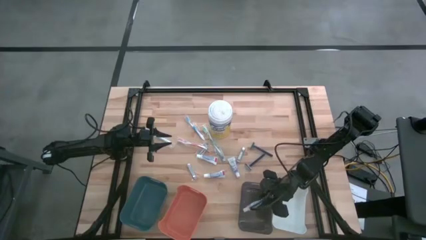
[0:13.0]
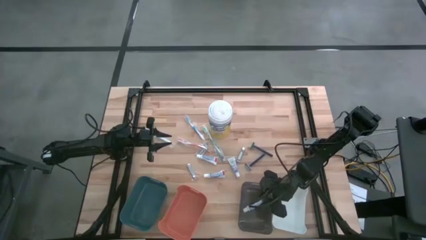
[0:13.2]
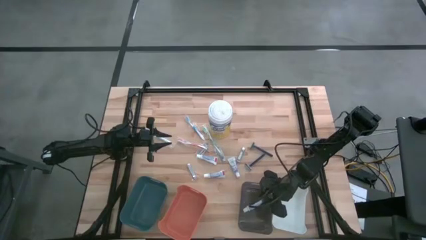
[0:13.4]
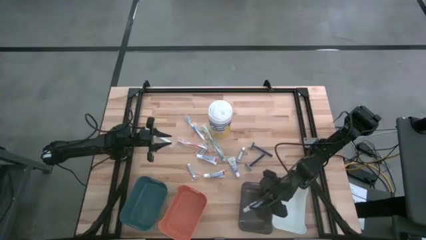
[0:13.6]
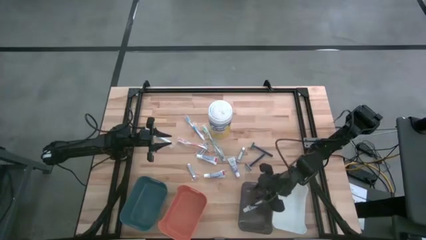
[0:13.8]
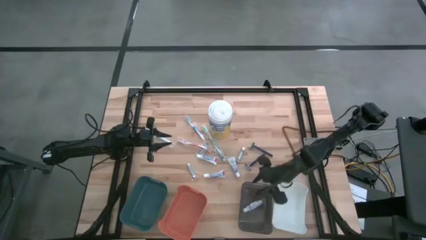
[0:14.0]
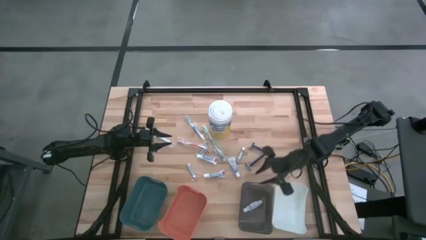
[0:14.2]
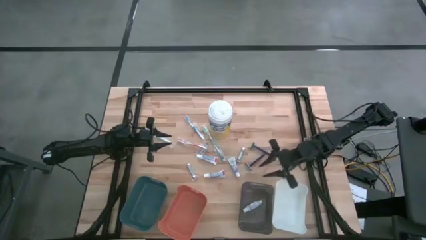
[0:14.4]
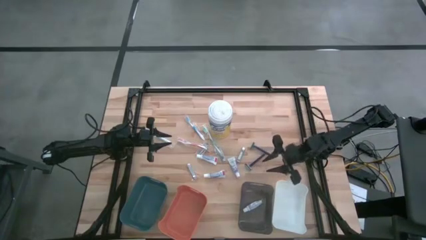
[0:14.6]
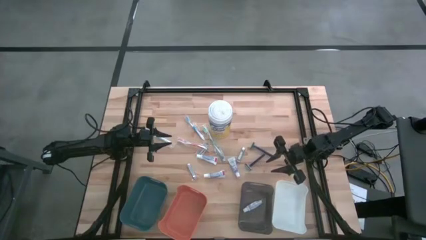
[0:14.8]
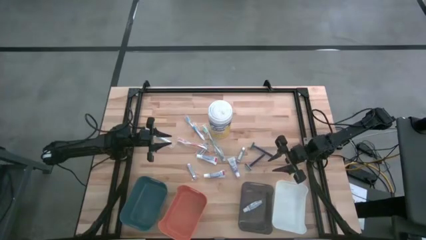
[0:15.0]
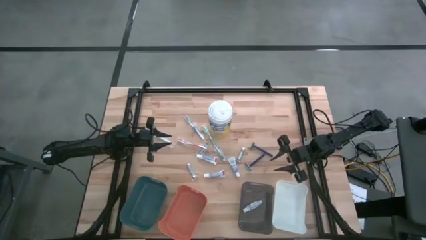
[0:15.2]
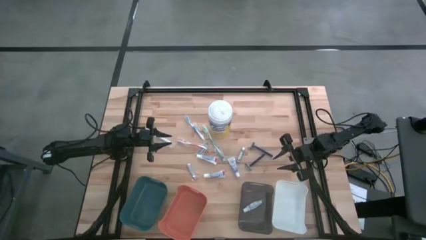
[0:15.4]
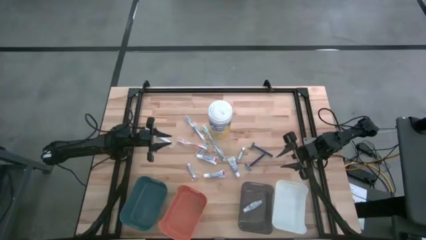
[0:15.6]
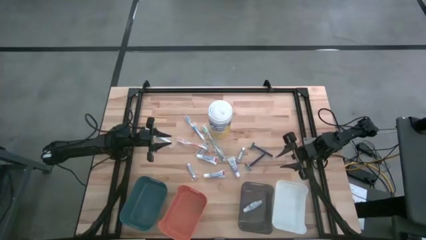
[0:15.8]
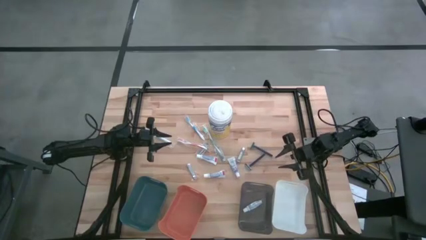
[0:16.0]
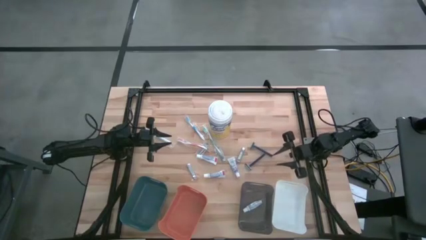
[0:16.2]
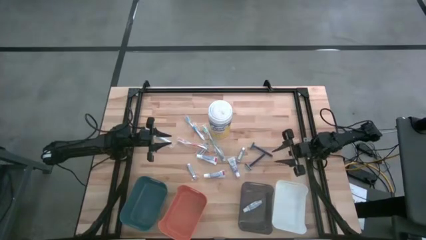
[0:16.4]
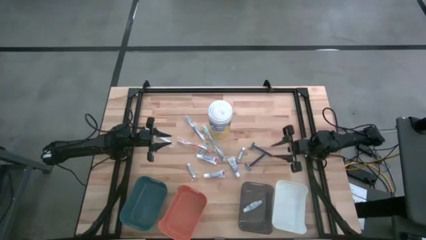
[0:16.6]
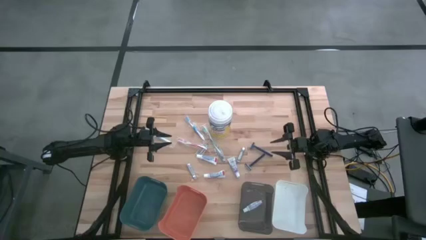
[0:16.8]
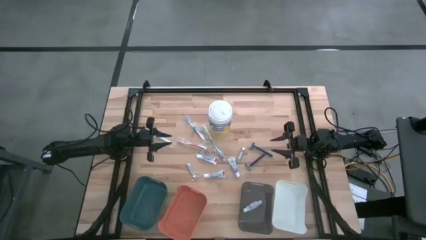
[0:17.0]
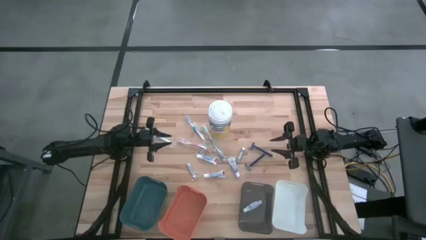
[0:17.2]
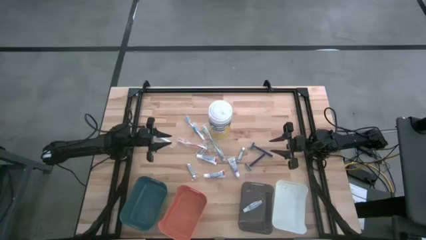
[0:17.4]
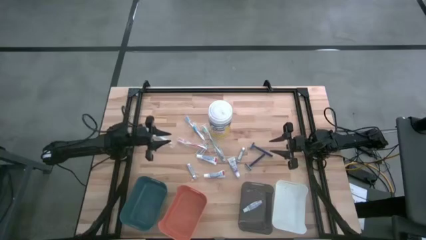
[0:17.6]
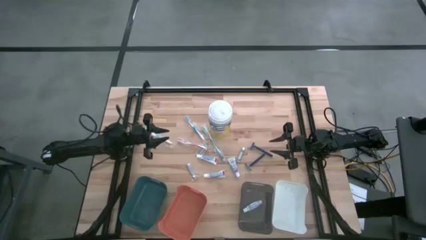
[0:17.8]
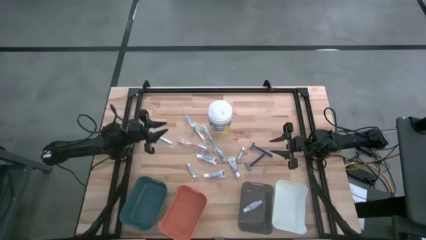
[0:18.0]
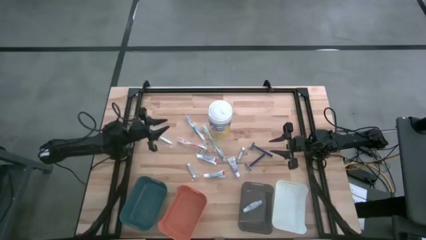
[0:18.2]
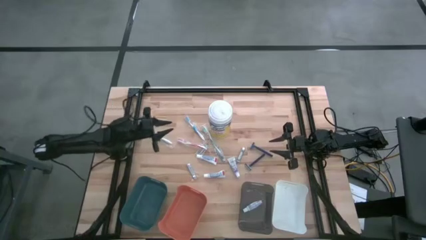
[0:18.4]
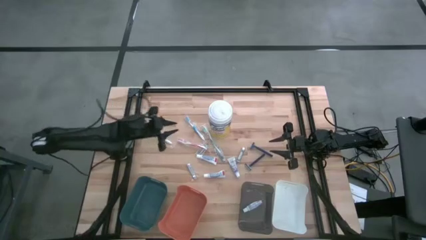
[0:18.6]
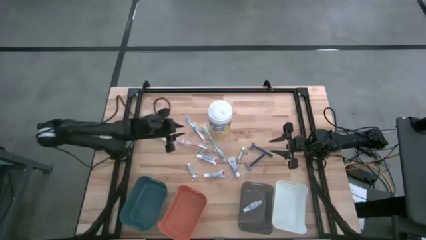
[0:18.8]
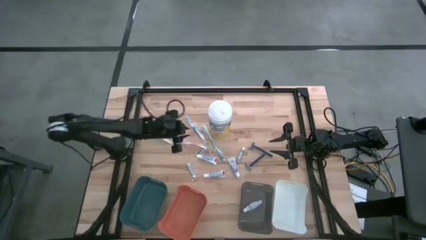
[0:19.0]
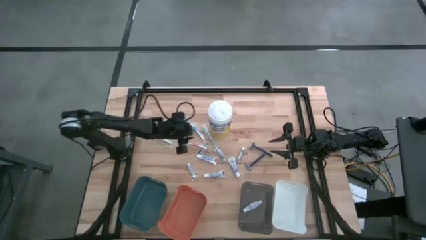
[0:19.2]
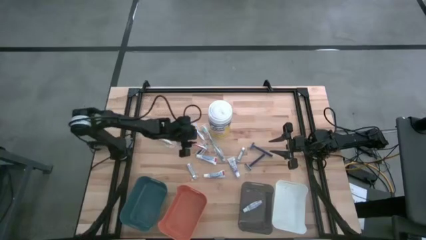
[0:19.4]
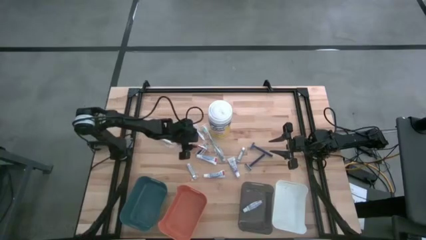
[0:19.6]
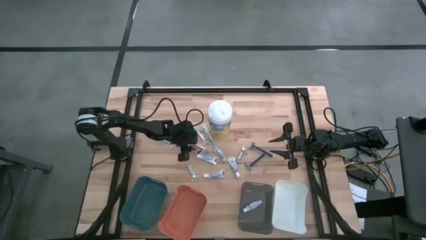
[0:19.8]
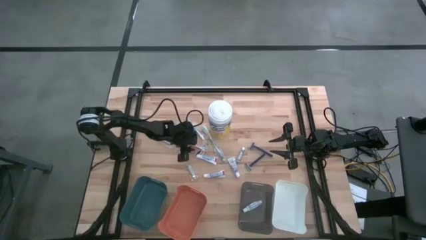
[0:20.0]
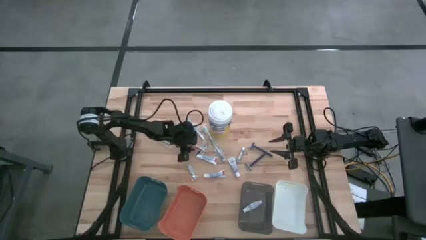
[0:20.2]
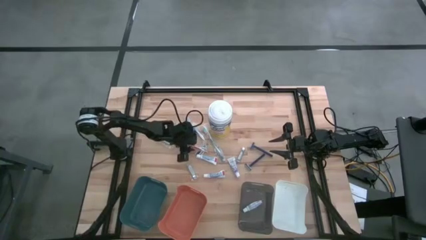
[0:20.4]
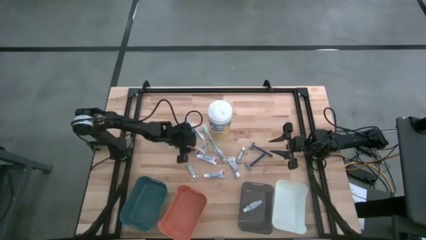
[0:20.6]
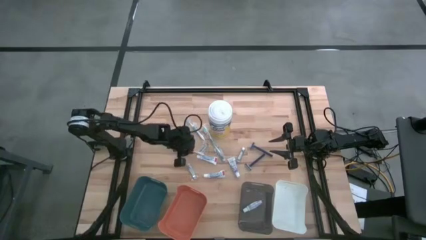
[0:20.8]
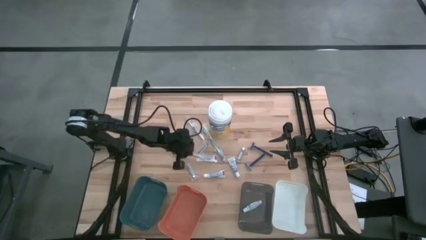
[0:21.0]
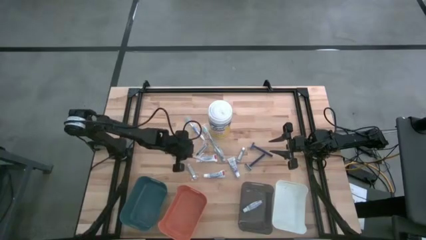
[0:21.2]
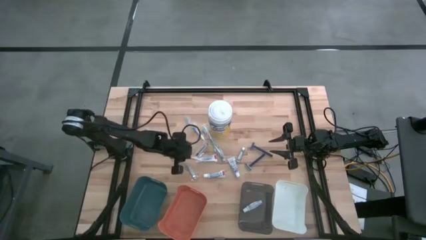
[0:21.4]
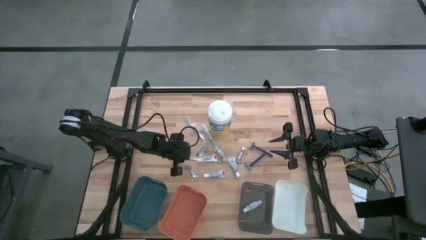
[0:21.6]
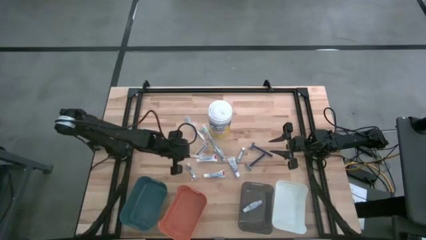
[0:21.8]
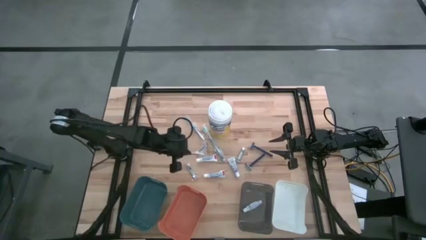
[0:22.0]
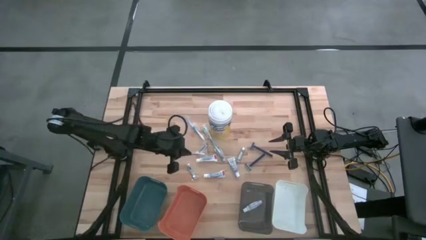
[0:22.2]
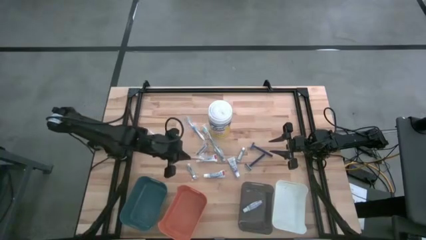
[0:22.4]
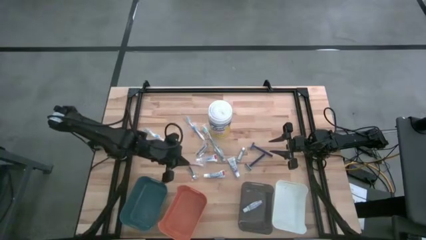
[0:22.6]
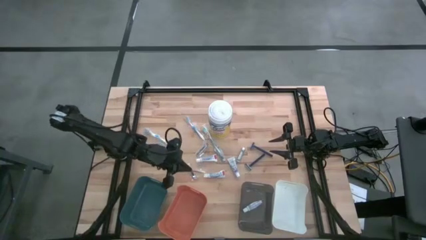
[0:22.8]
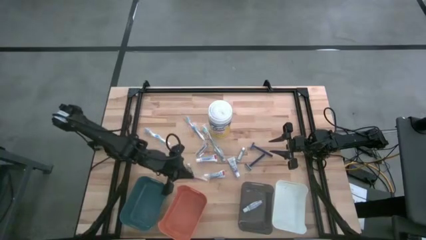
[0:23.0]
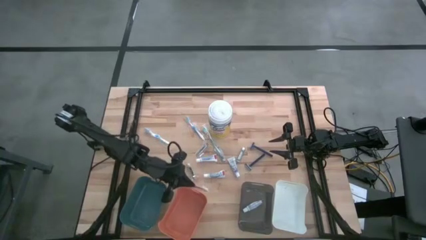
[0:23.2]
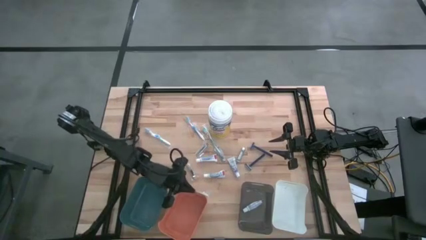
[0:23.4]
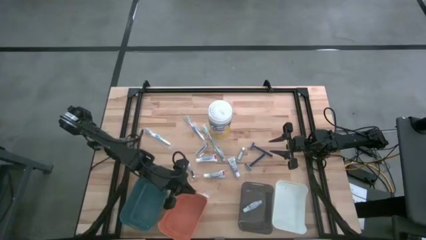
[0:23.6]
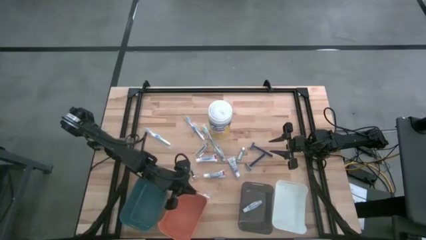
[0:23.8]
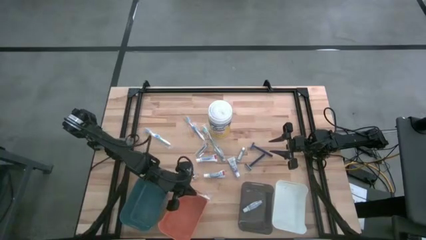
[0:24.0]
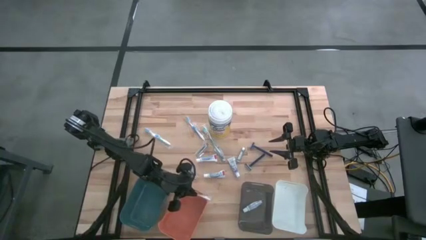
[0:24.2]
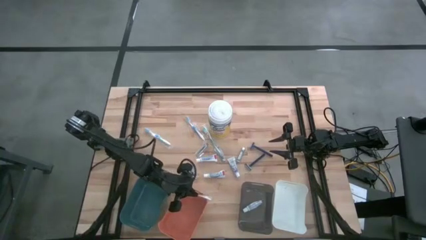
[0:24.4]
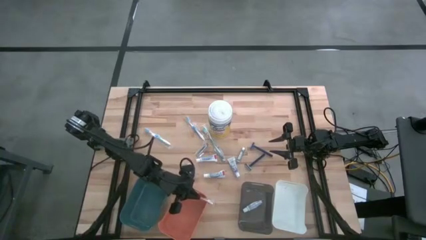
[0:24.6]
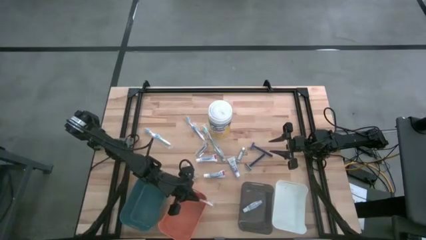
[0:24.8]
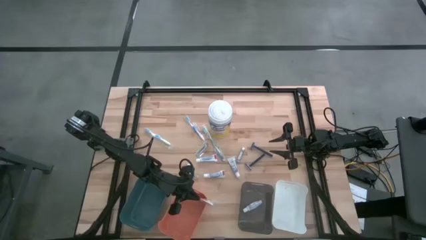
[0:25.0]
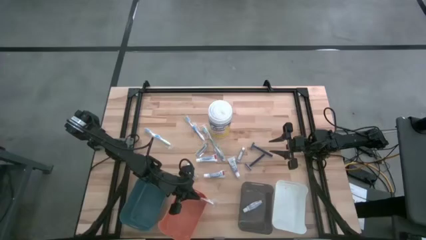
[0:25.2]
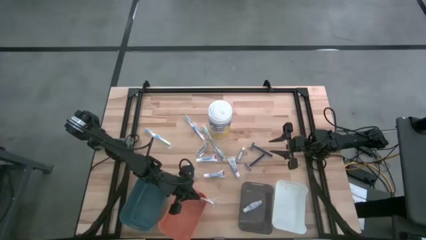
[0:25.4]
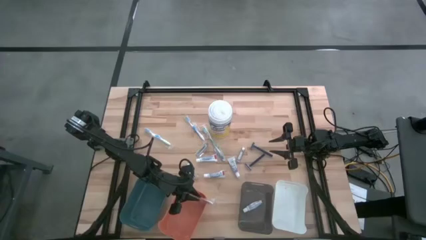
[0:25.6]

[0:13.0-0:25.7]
Task: Pick & Place Travel size toiletries
Put the red toothbrush into the orange bin

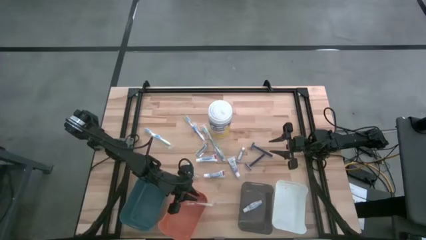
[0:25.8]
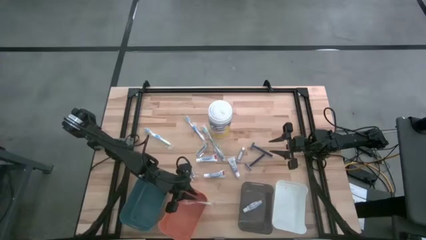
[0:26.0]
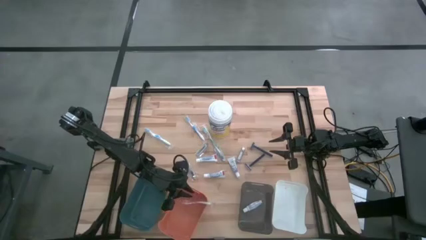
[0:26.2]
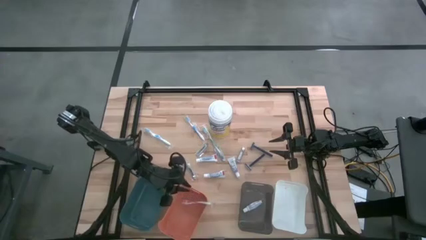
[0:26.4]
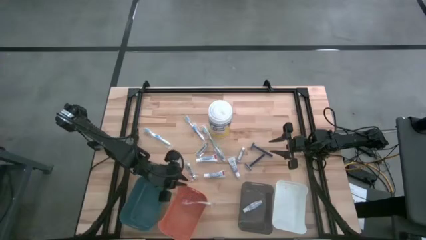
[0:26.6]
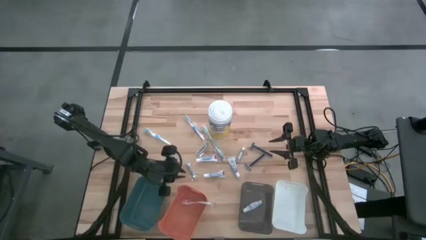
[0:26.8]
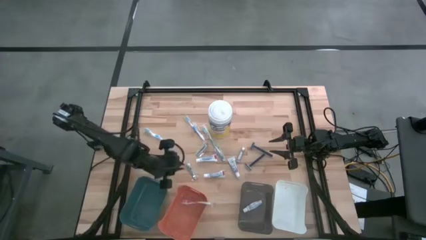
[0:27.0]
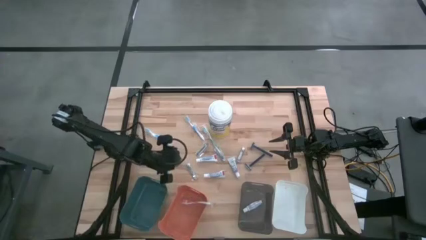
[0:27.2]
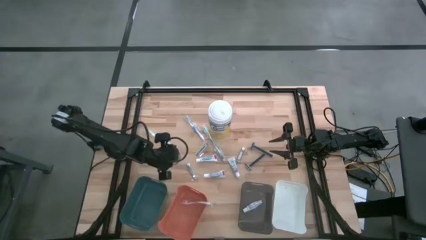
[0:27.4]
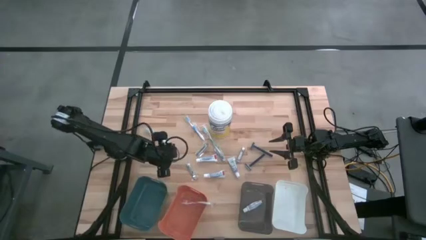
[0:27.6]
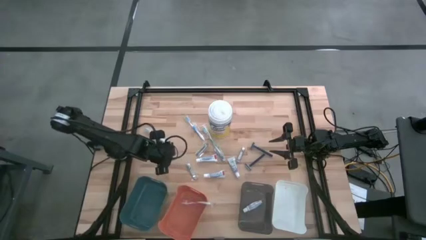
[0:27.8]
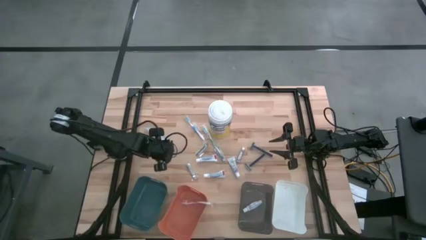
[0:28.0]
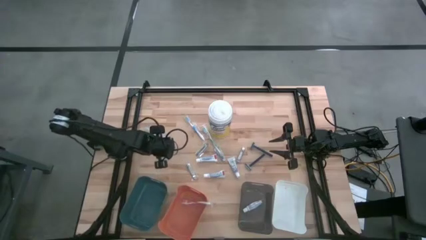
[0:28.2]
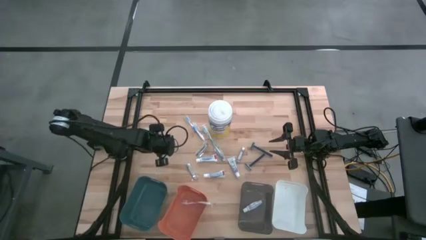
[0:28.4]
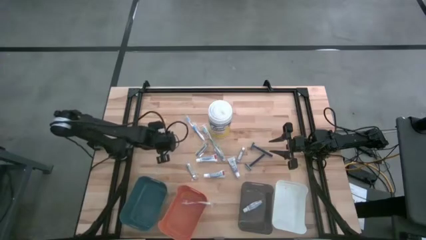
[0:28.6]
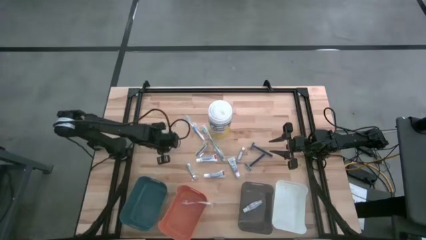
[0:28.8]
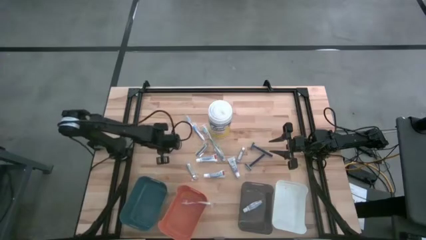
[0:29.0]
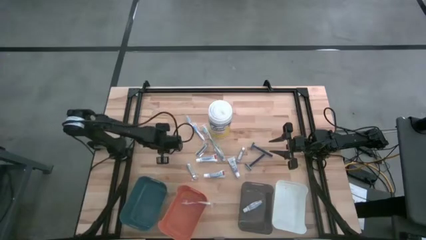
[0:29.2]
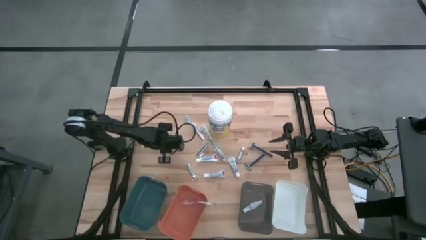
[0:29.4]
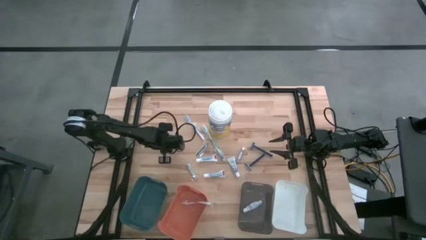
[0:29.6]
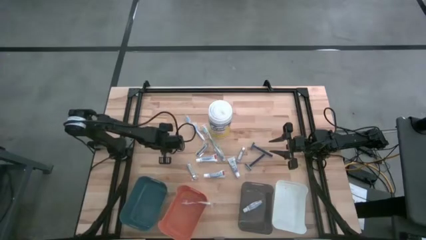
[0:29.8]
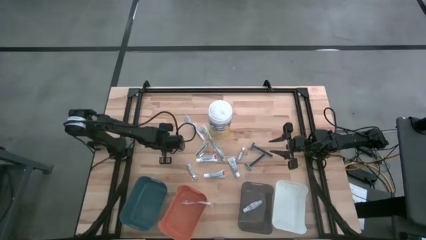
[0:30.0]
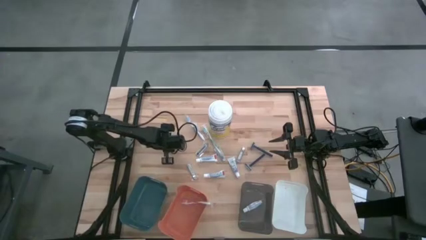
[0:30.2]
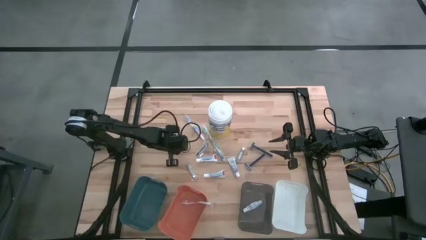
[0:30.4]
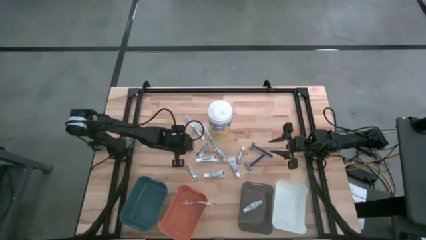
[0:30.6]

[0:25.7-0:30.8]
Put the blue toothbrush into the orange bin
